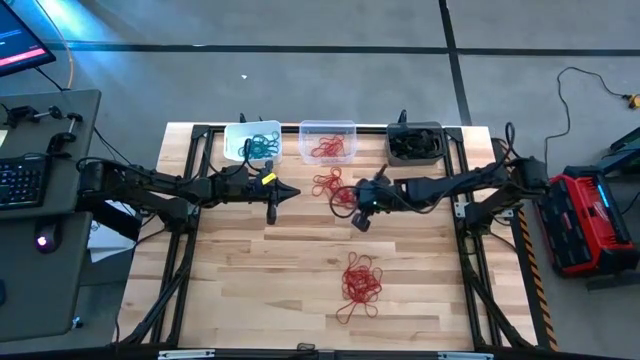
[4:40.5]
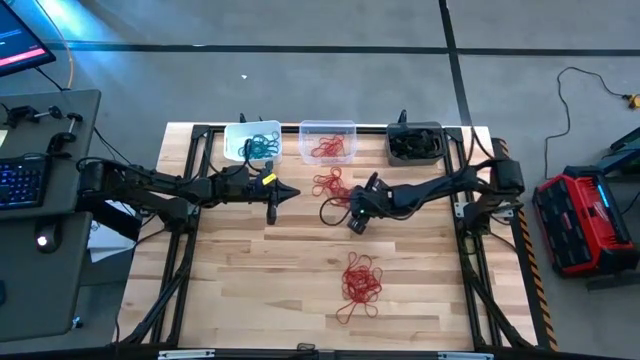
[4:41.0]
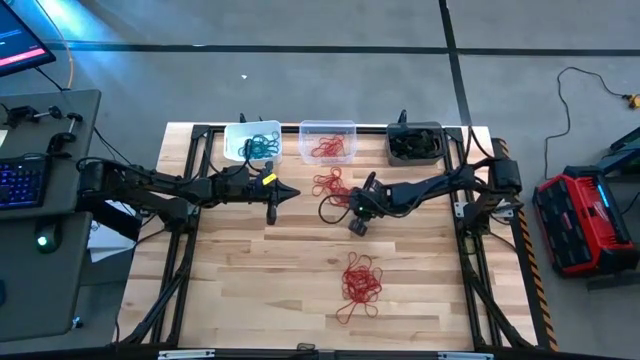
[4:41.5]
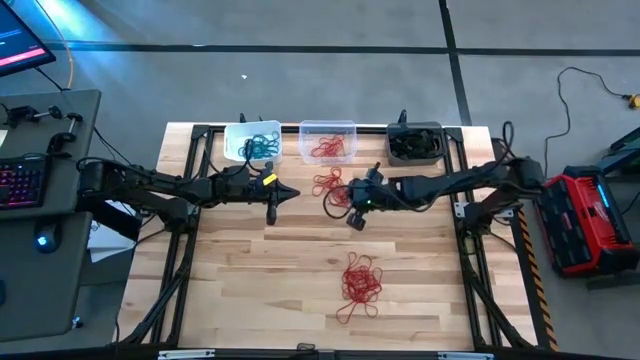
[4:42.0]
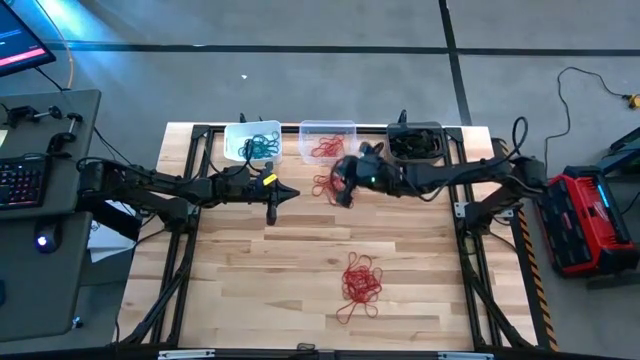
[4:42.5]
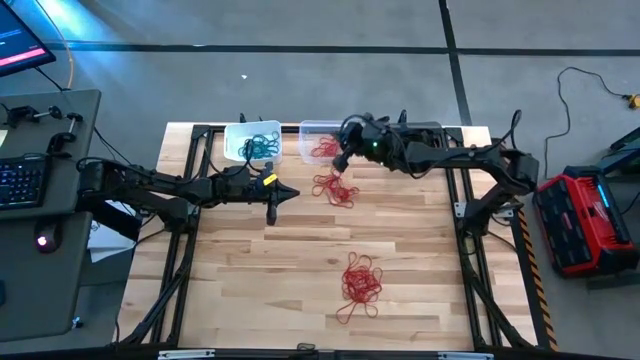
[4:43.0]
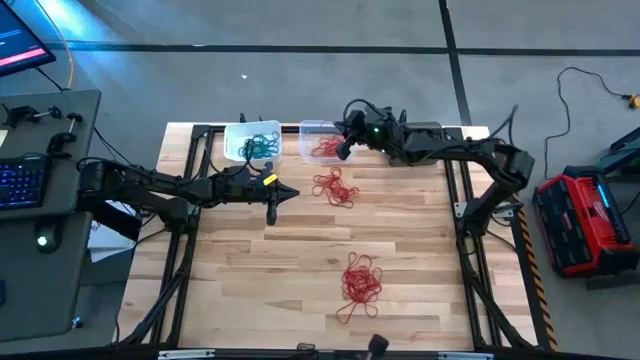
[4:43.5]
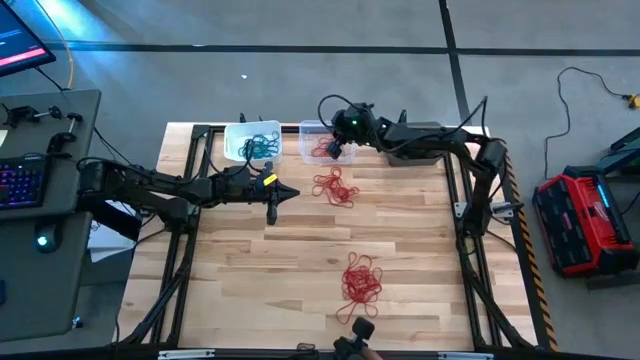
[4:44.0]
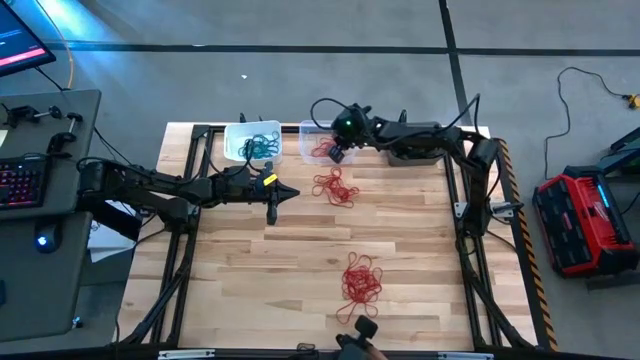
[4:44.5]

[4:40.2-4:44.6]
Task: Sort rubber bands into baskets
Put the red rubber band into the transparent bin

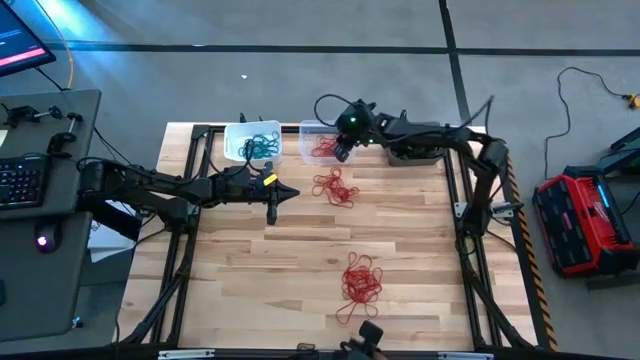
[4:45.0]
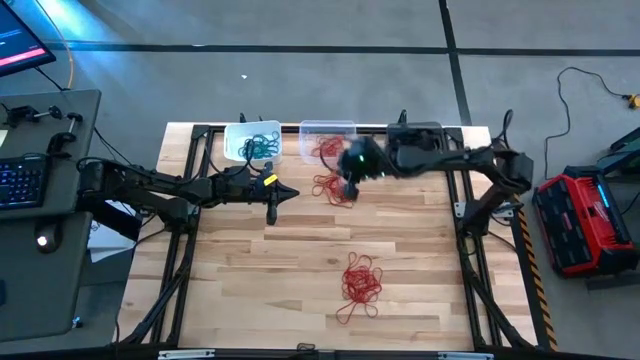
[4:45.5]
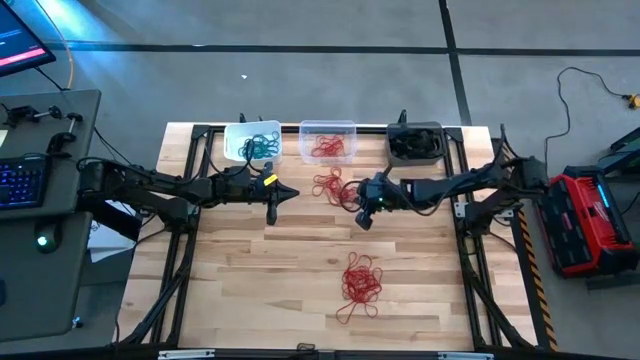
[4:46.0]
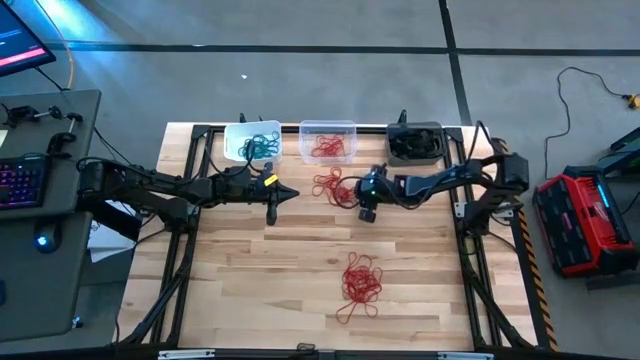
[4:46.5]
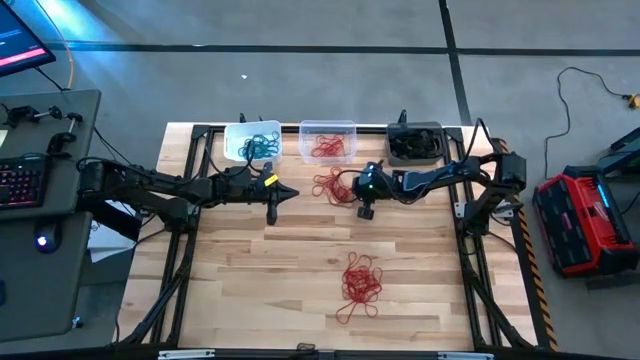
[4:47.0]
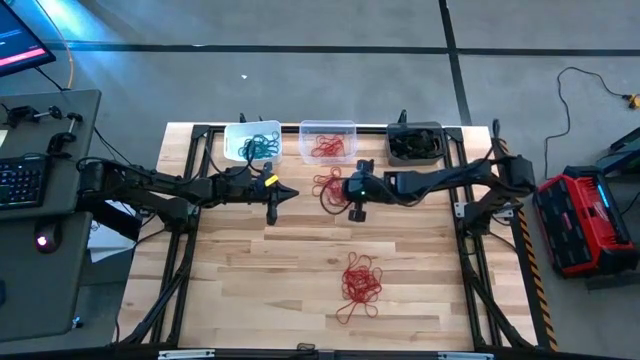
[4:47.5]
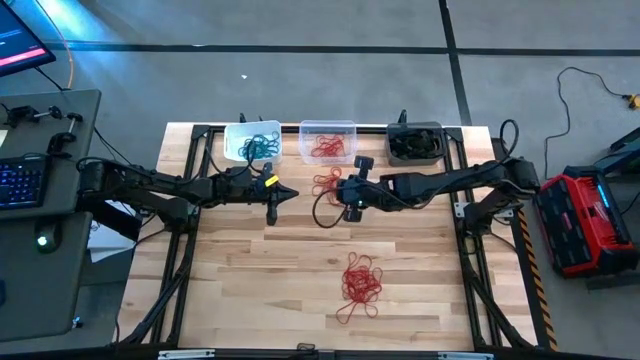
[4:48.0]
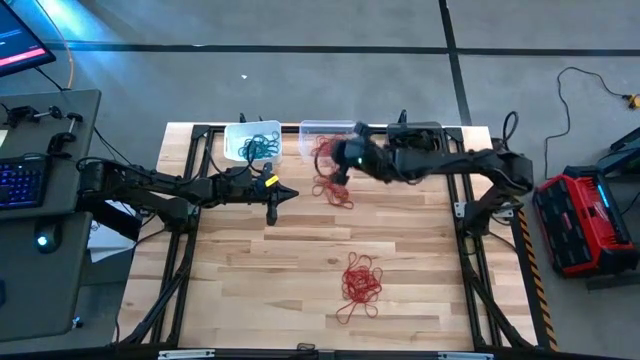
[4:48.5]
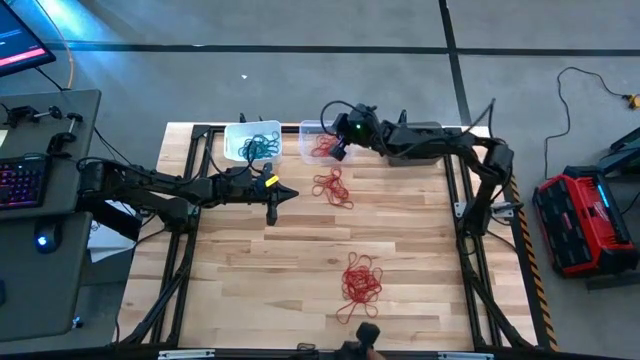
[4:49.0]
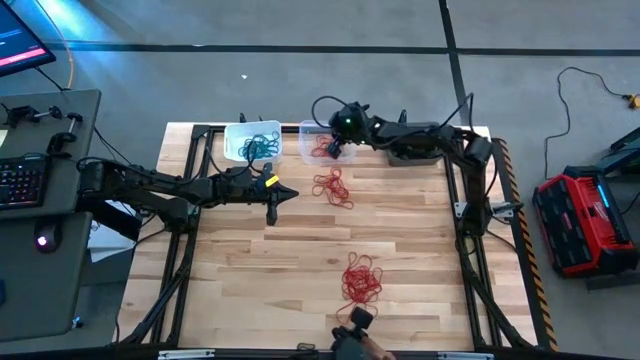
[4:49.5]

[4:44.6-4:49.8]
Put the red rubber band into the transparent bin

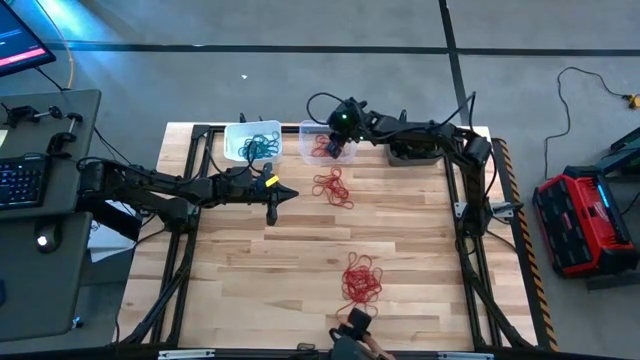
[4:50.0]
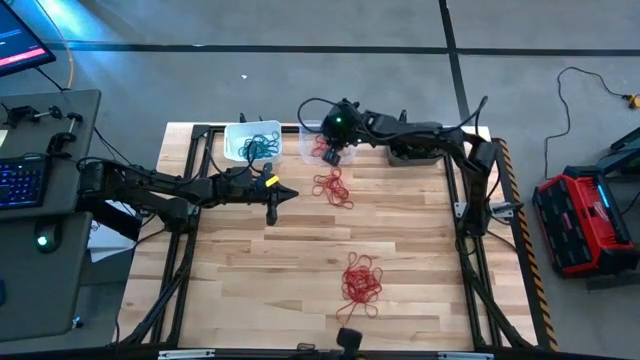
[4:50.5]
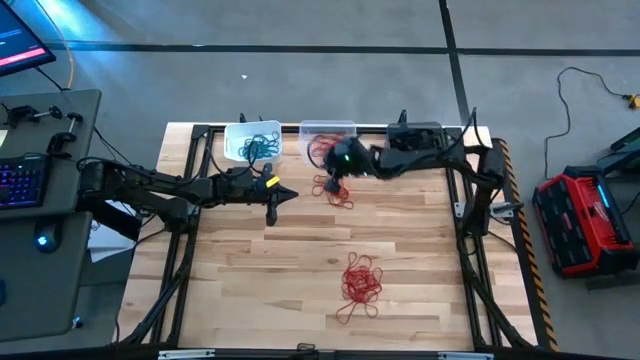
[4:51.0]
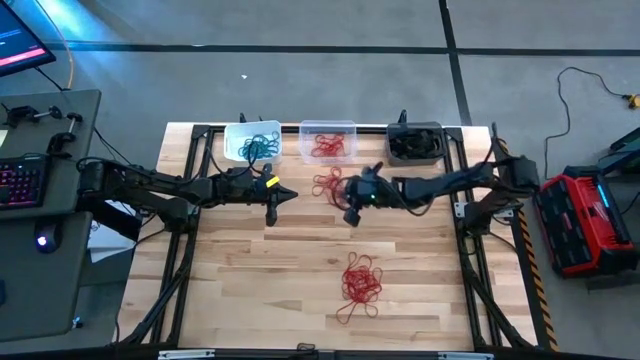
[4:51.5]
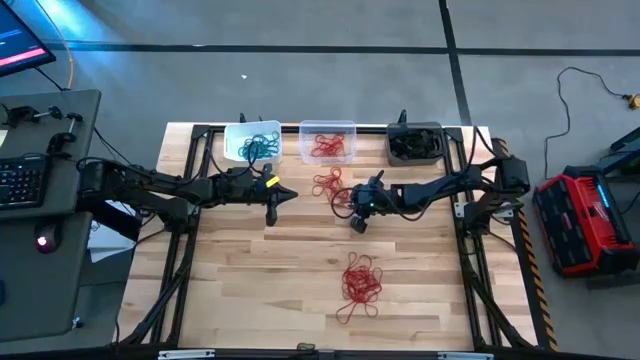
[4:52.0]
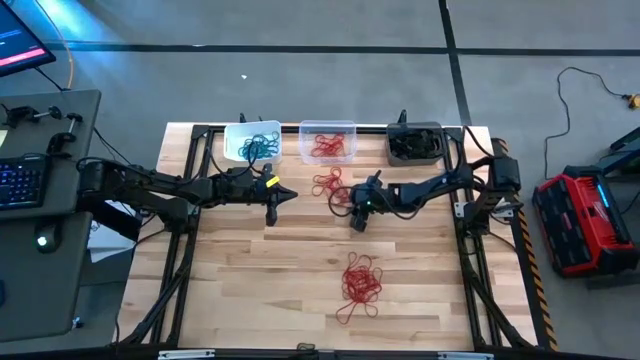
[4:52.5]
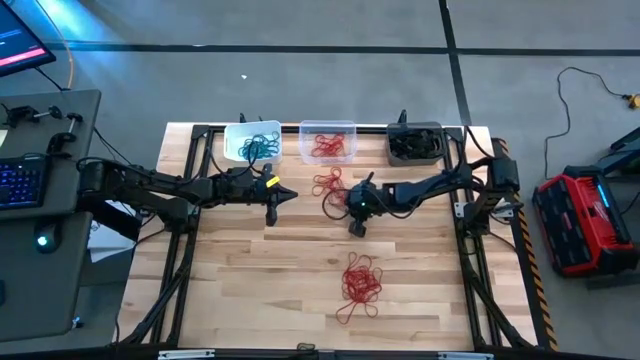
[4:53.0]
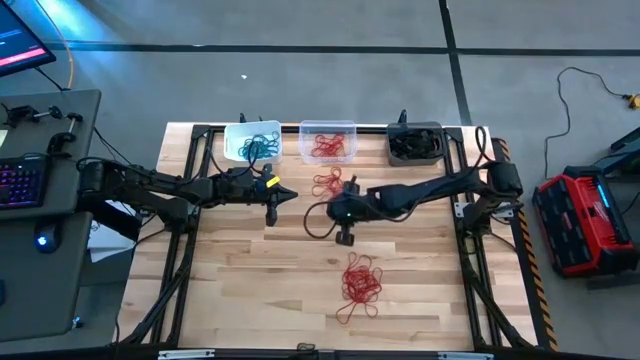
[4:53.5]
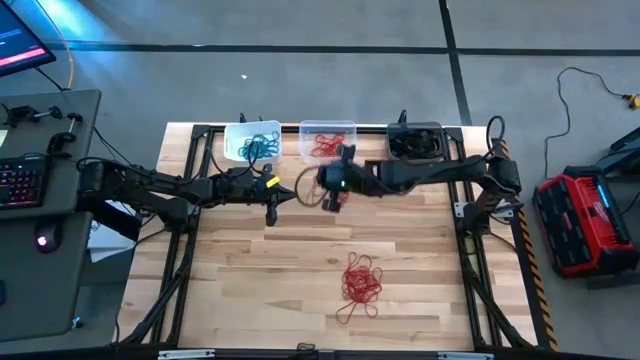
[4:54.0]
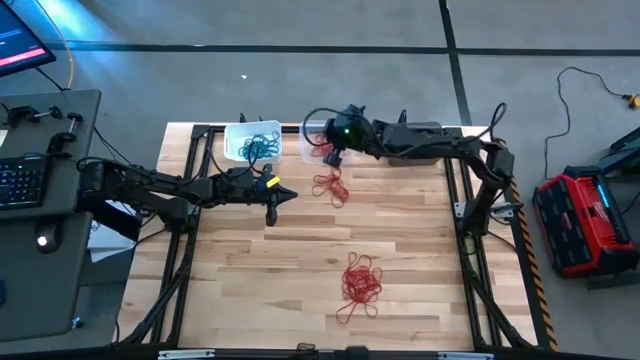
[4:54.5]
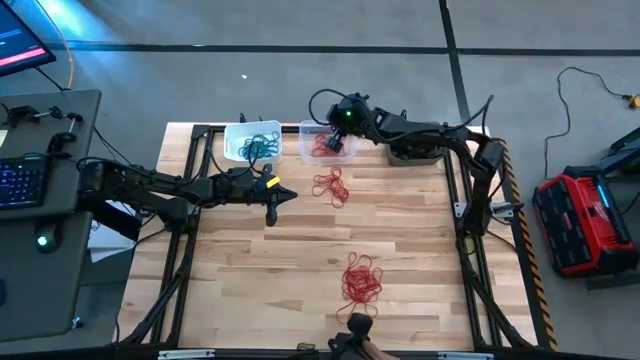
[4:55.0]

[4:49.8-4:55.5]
Put the red rubber band into the transparent bin

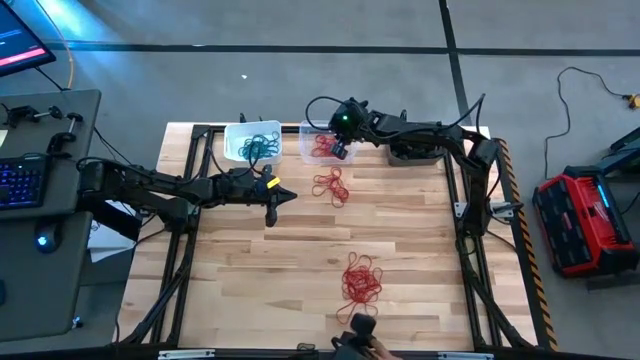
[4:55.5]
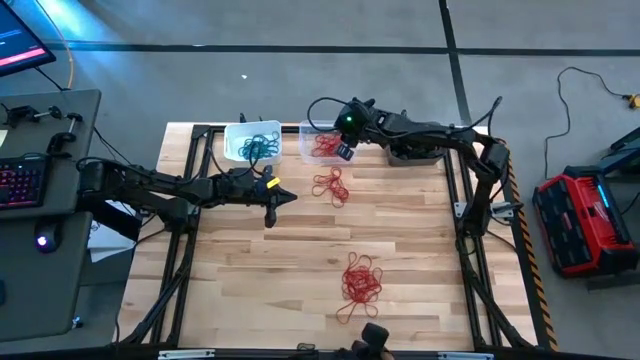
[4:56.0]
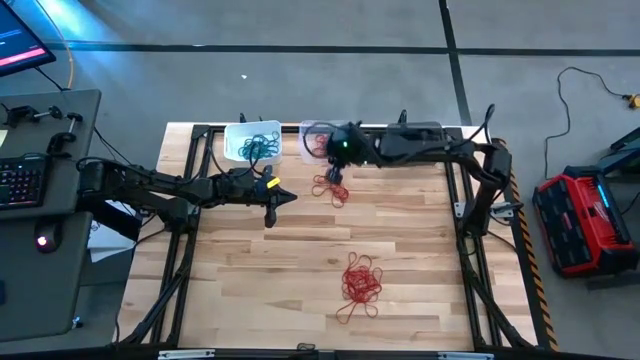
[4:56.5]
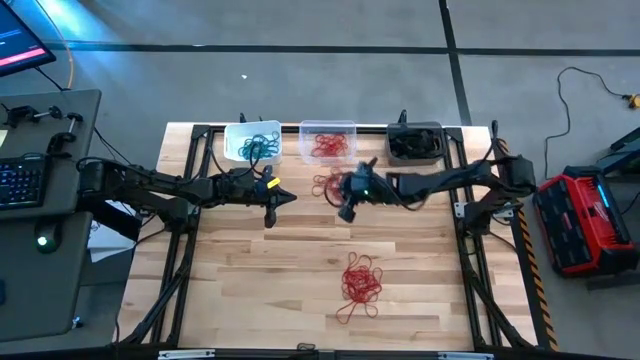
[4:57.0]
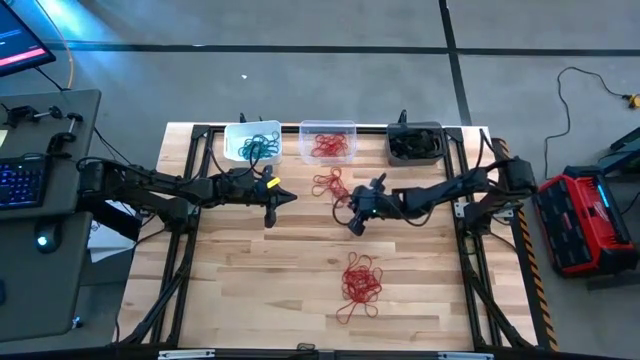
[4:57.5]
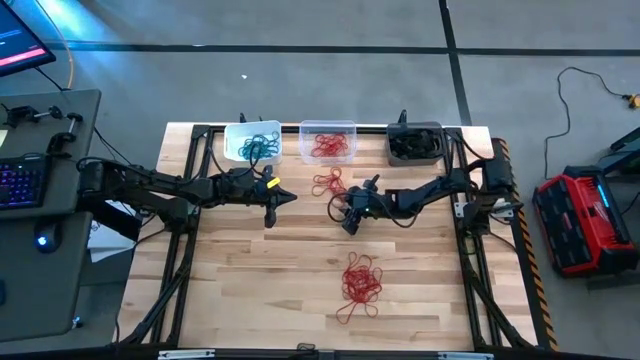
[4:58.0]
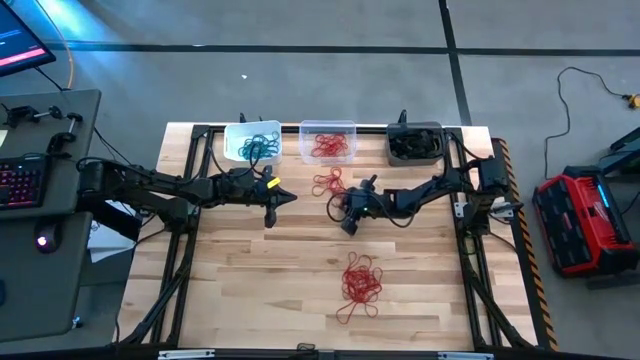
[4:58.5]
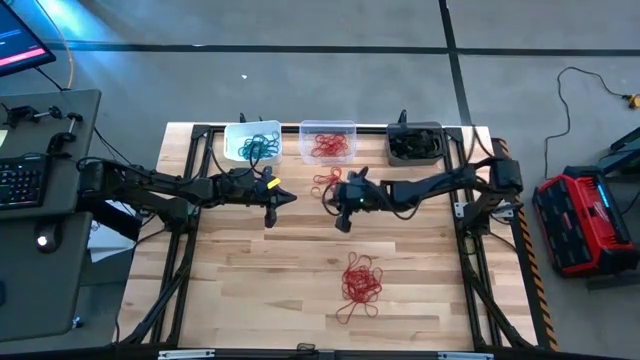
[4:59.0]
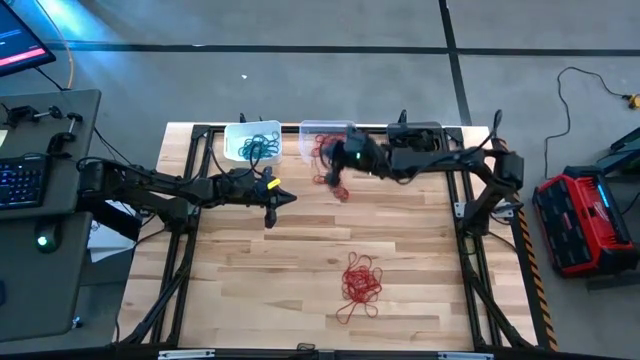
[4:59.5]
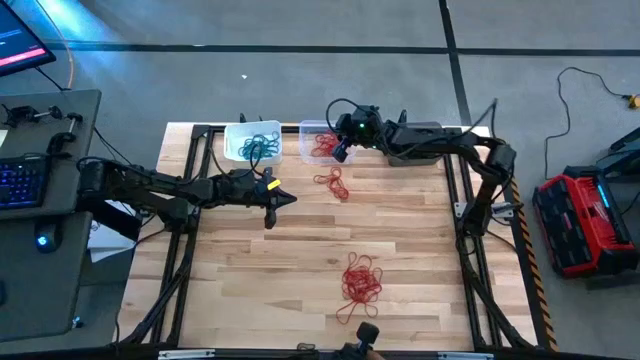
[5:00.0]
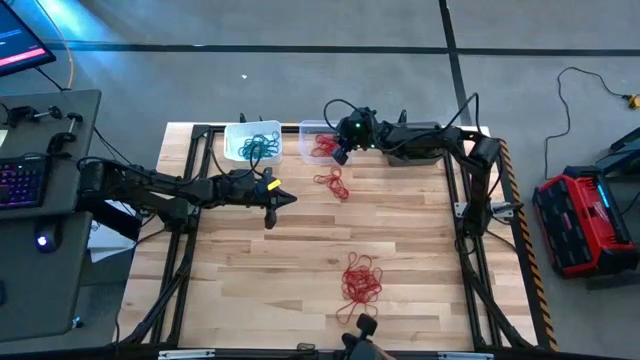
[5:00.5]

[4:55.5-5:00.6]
Put the red rubber band into the transparent bin
